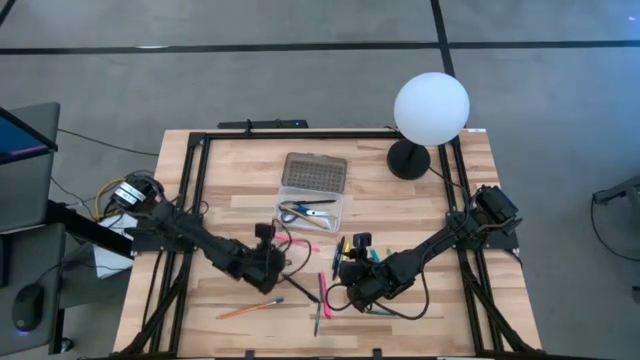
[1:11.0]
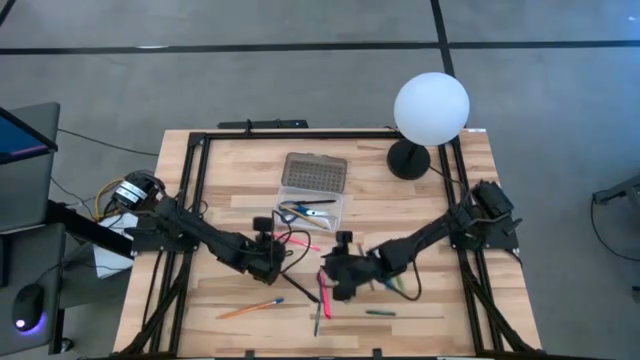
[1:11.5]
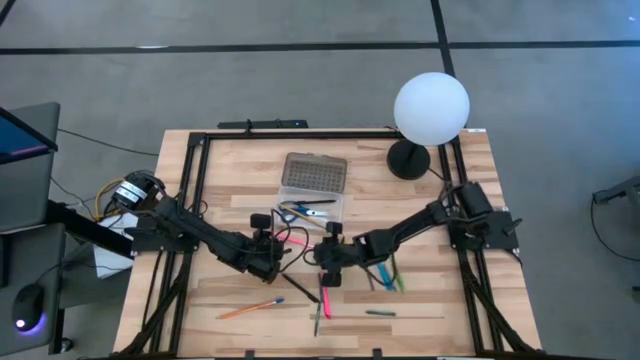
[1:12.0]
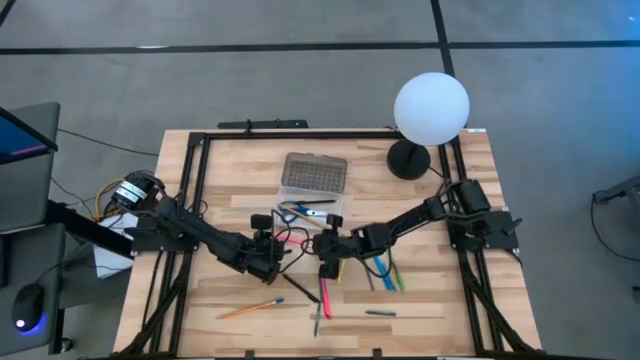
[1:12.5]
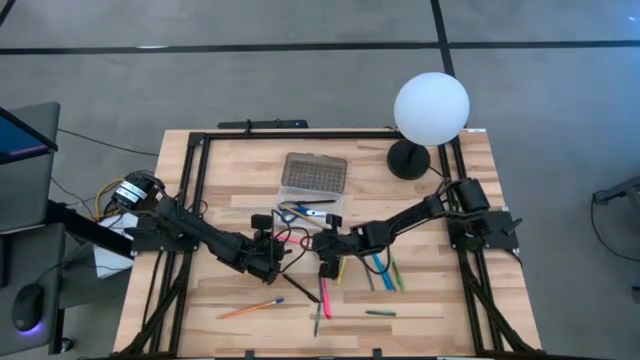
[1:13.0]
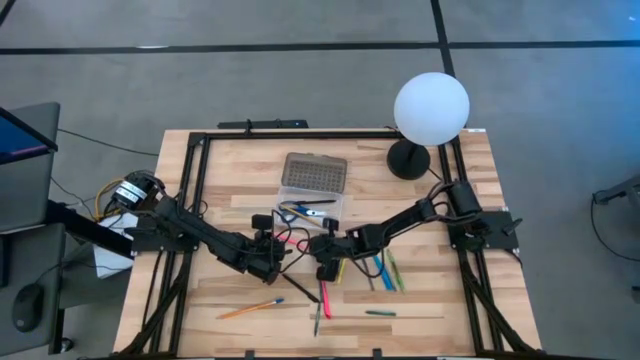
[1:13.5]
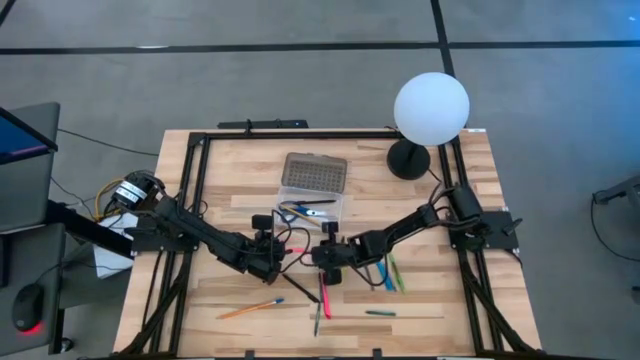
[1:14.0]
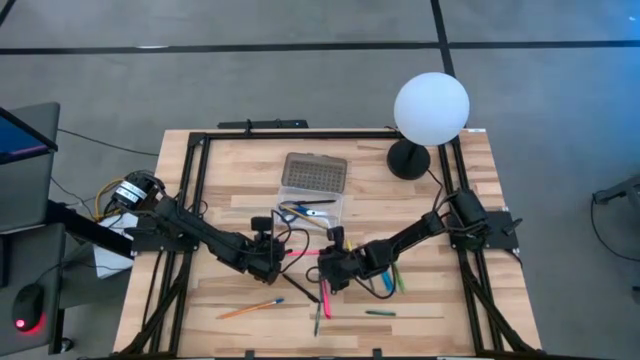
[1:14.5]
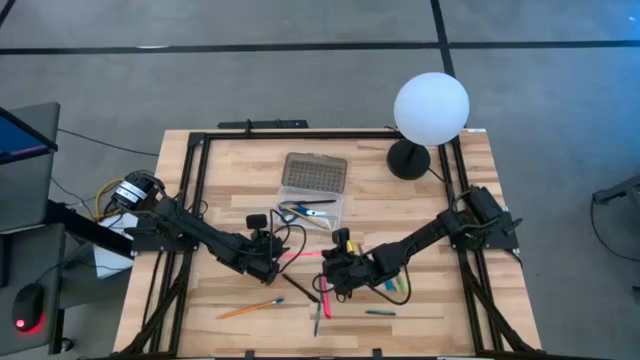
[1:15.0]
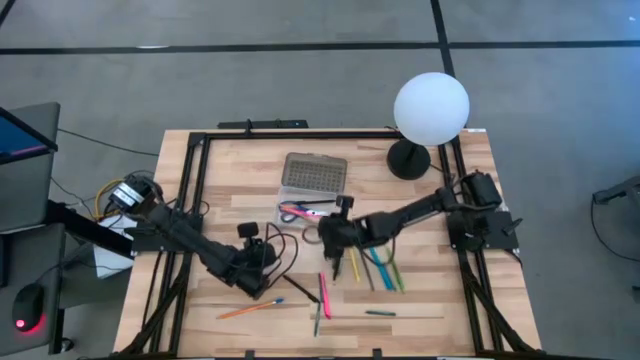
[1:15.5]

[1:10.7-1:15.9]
Task: Pick & place school supplies into a supply box
Put the pink pencil into the gray supply box

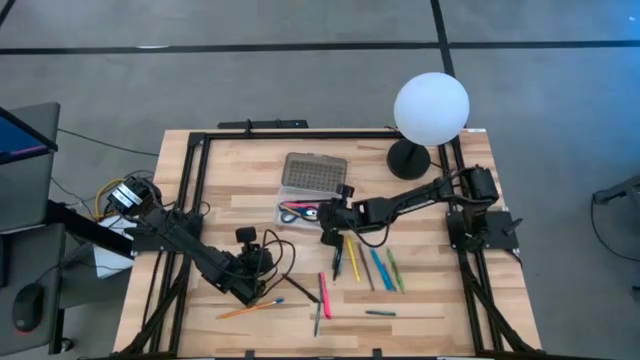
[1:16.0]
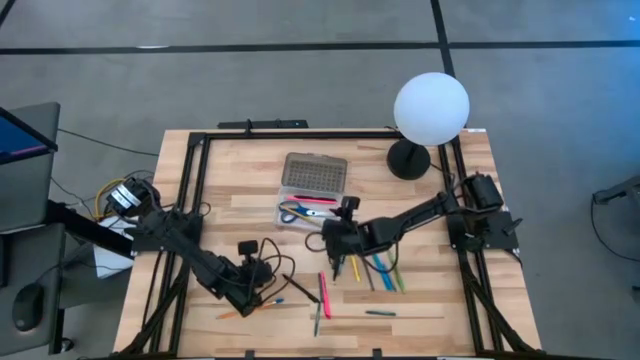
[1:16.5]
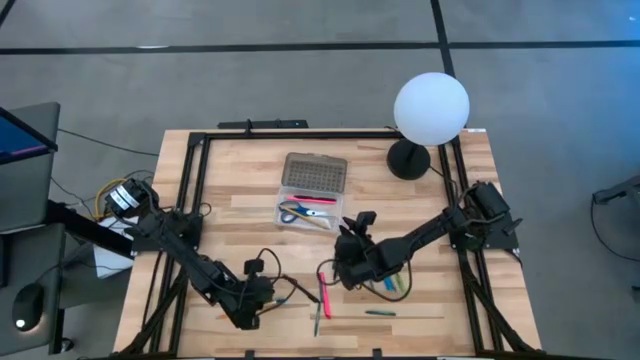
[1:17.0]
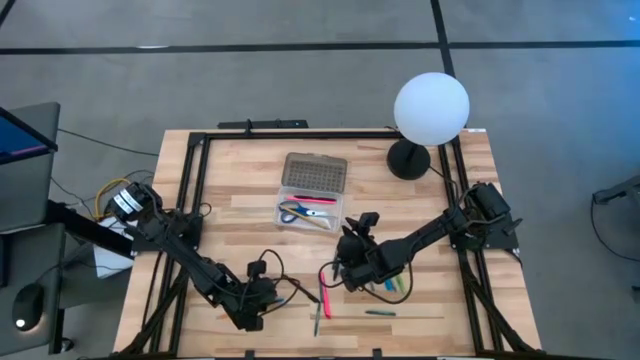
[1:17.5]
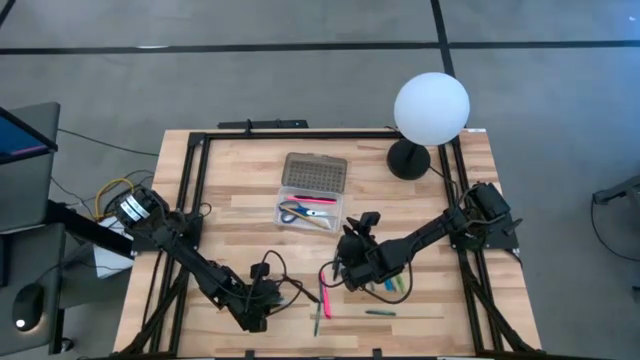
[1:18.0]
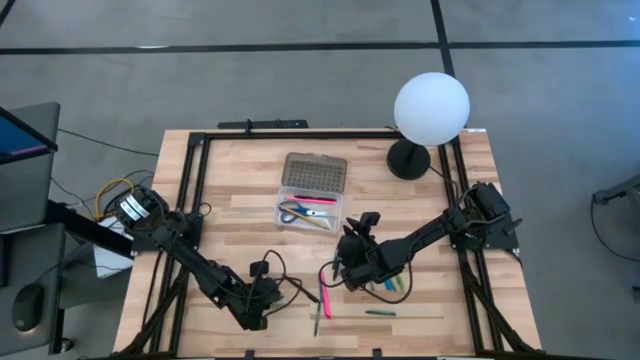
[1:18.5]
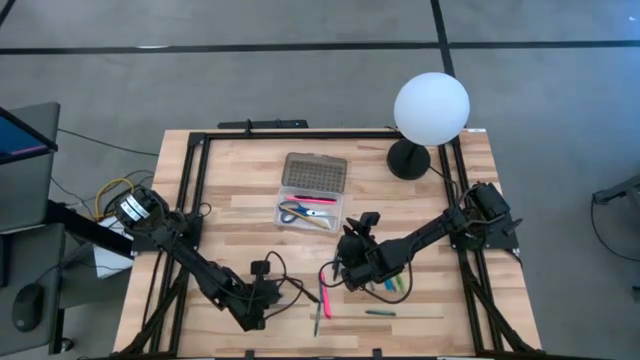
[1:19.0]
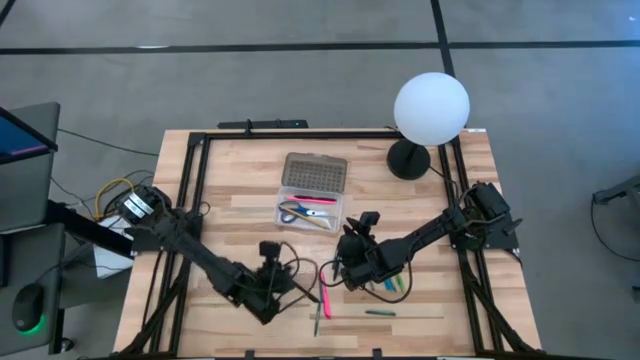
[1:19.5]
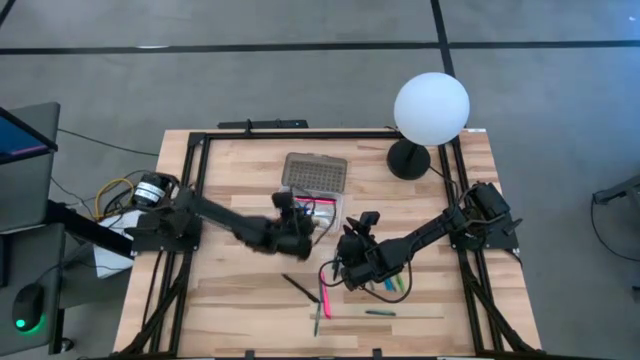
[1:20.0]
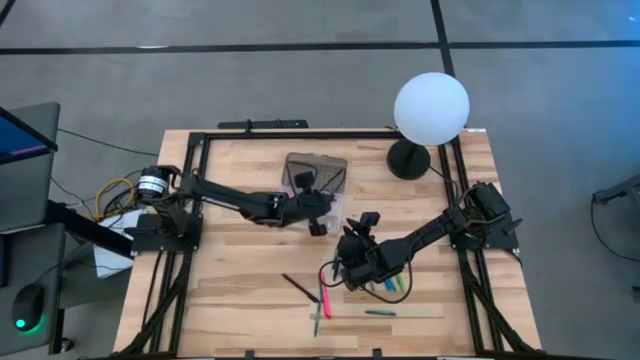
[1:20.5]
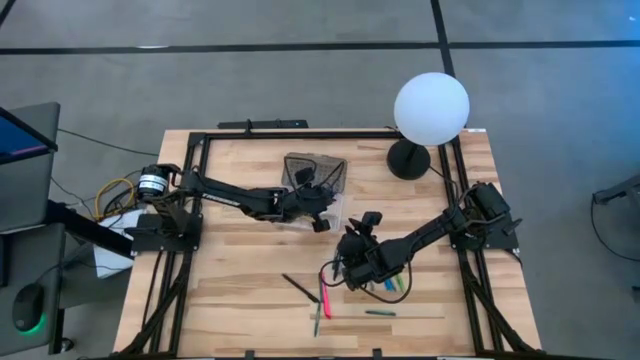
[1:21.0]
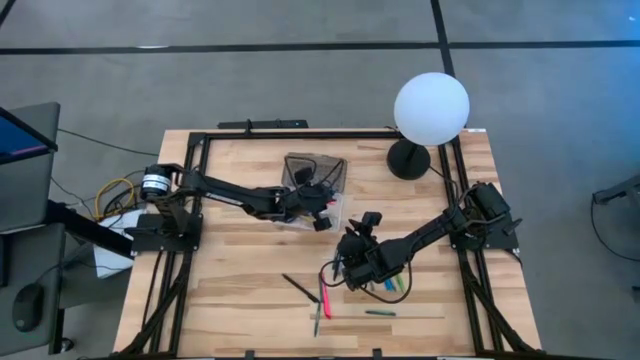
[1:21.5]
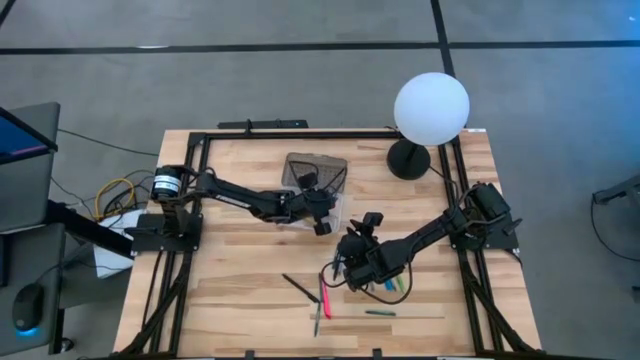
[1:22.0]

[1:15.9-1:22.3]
Put the orange pencil into the gray supply box

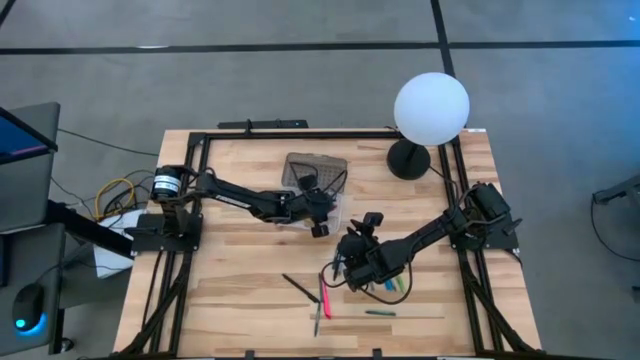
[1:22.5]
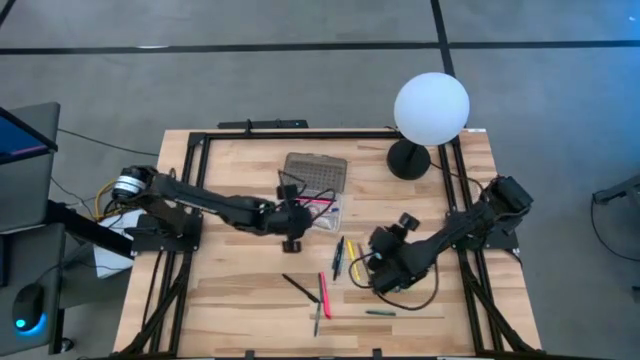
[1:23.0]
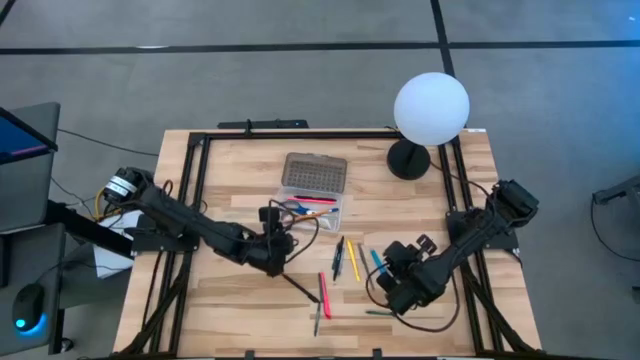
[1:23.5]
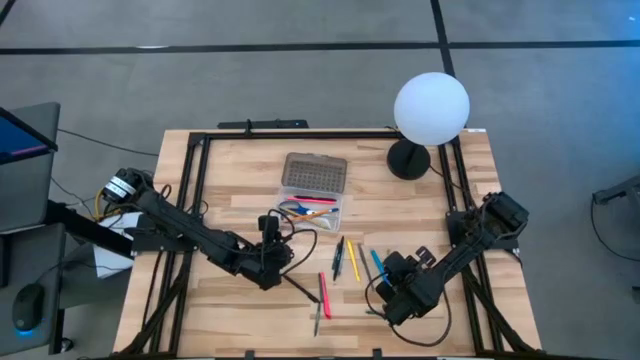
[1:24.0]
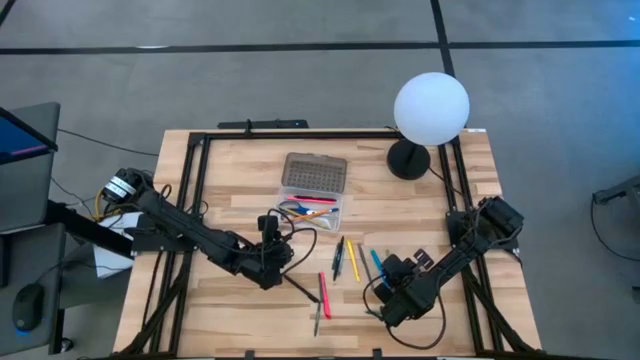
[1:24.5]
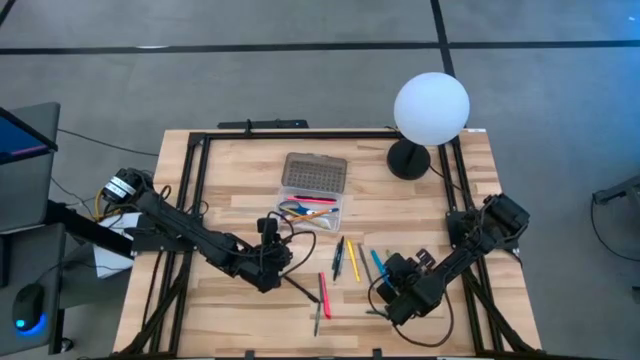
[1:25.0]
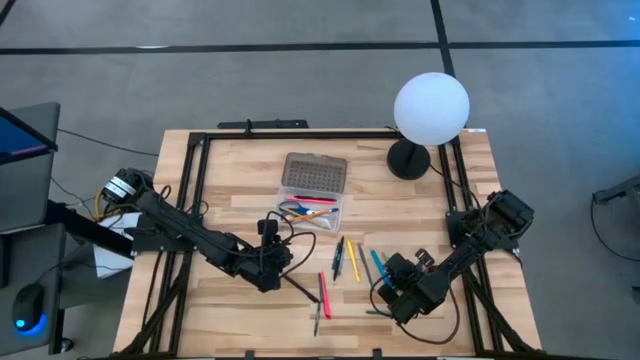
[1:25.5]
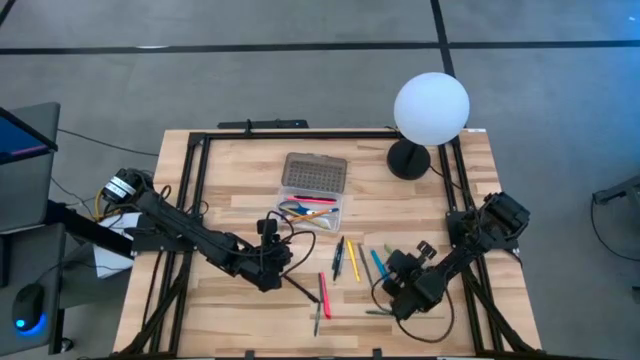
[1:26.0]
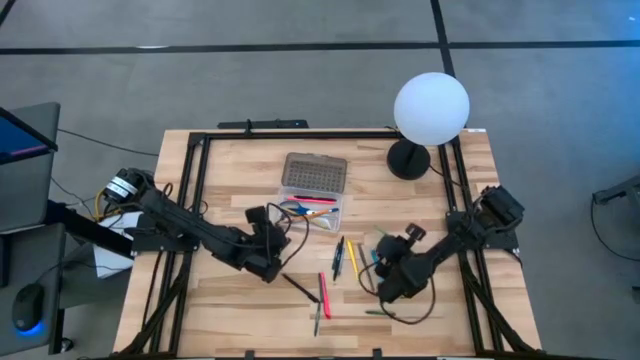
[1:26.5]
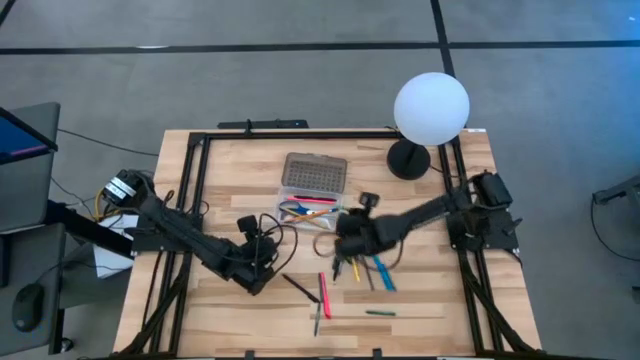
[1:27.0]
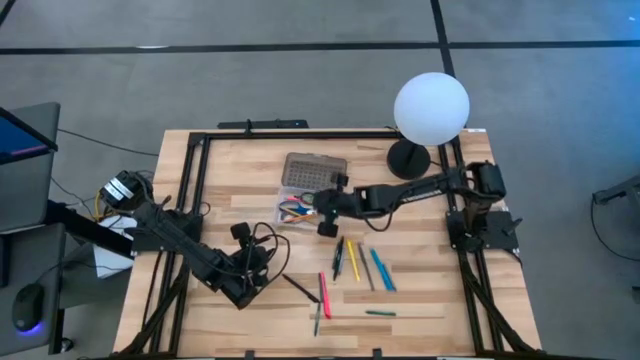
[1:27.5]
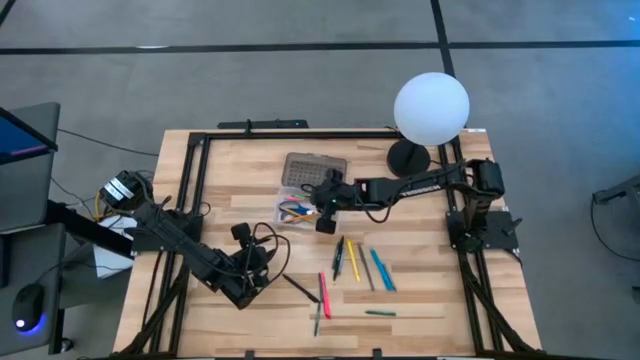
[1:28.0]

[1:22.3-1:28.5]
Put the green pen into the gray supply box

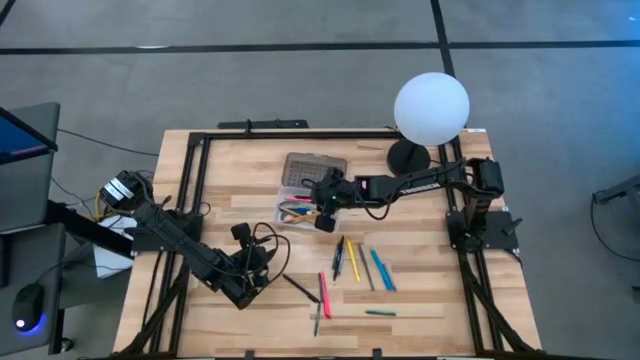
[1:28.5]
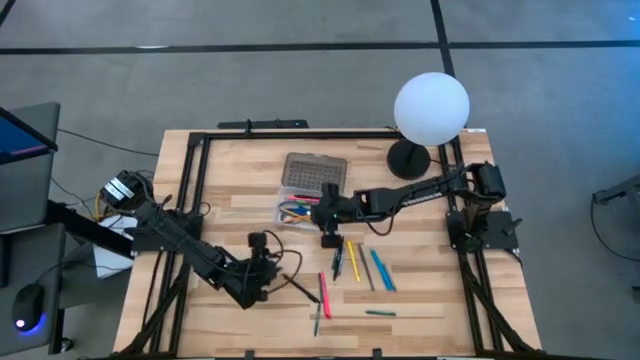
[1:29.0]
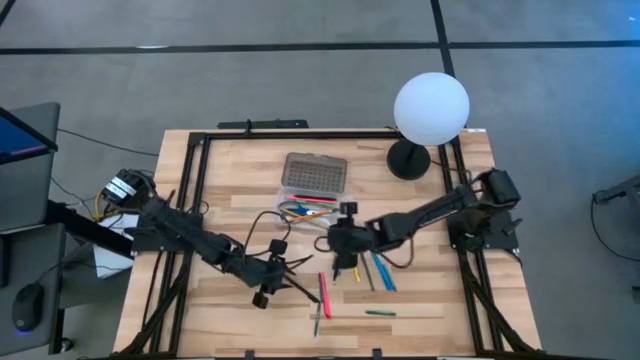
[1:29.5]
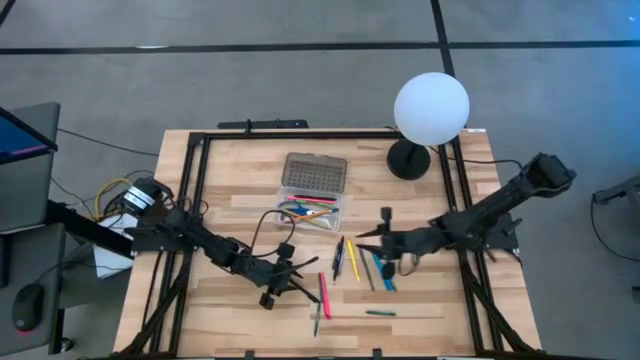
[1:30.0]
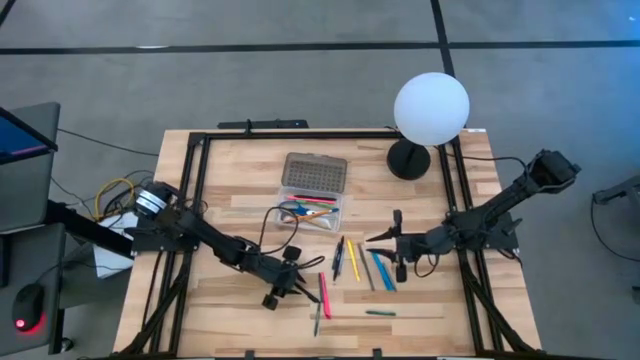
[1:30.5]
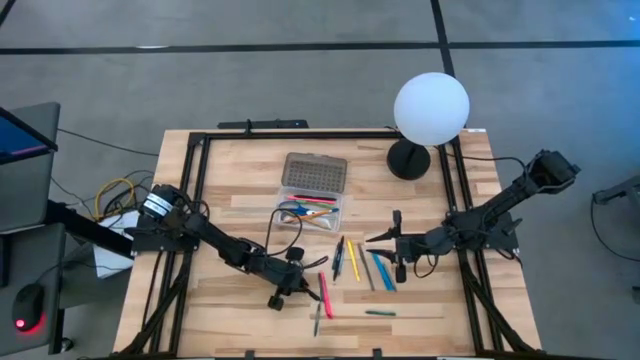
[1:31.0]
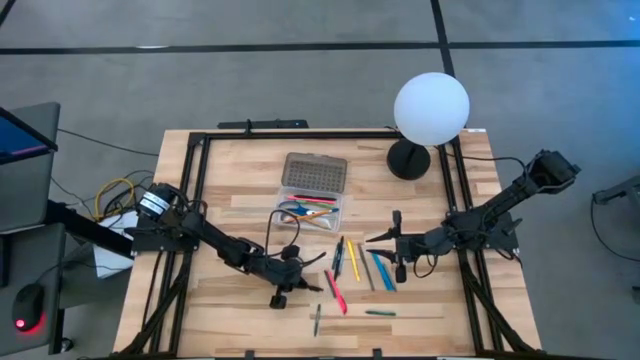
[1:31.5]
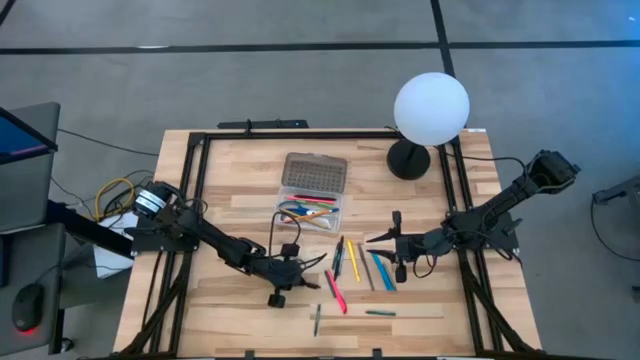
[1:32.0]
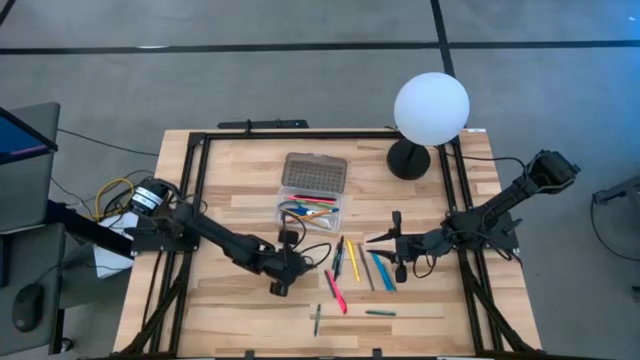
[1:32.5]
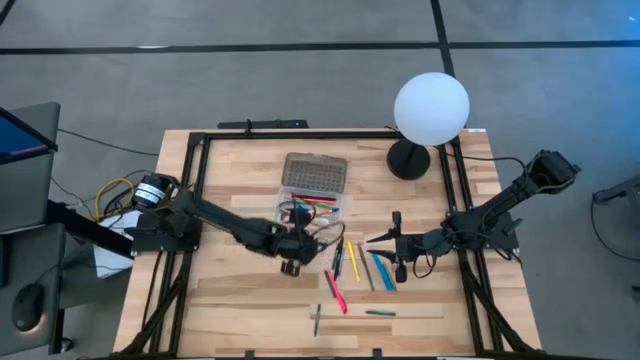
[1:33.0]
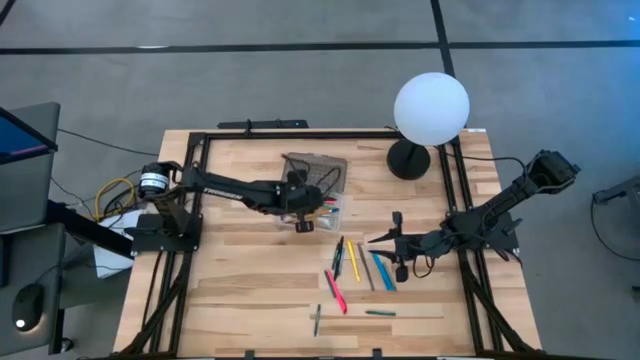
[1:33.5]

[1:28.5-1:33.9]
Put the black pen into the gray supply box
